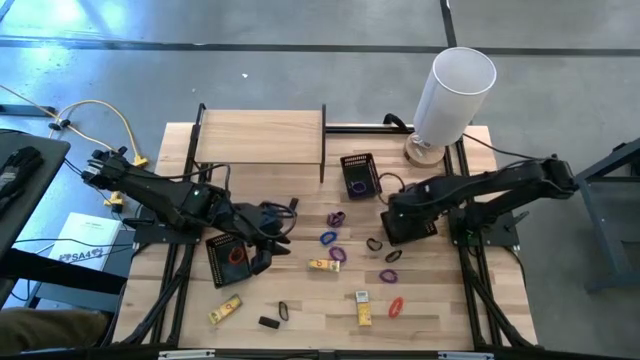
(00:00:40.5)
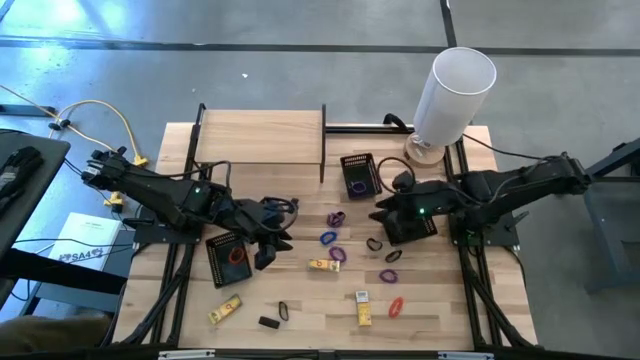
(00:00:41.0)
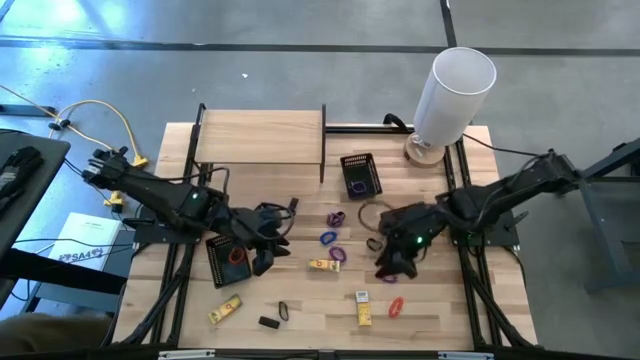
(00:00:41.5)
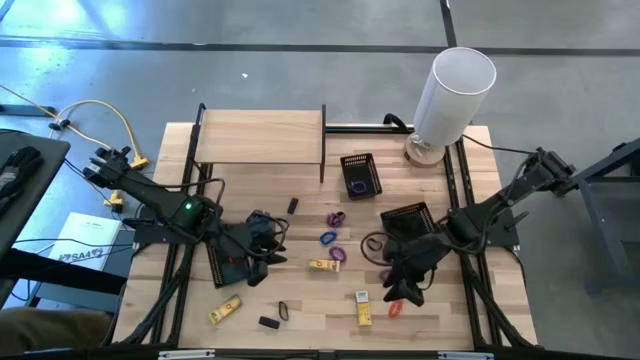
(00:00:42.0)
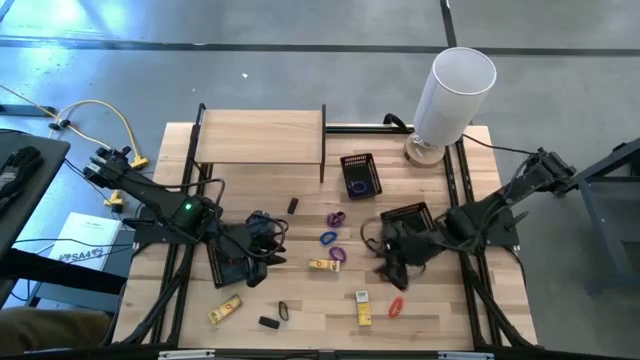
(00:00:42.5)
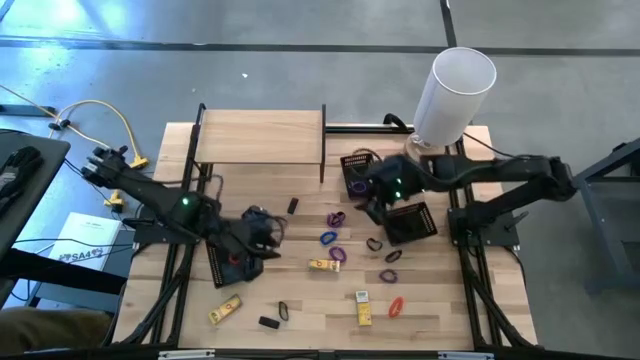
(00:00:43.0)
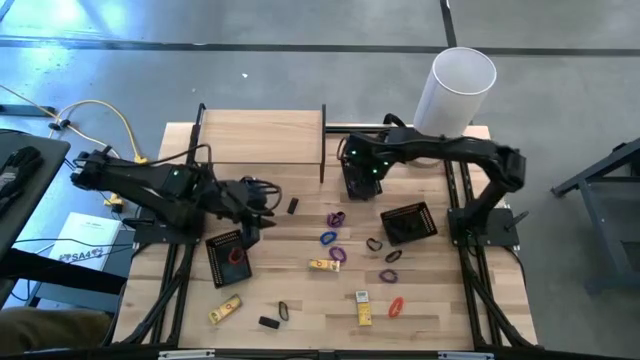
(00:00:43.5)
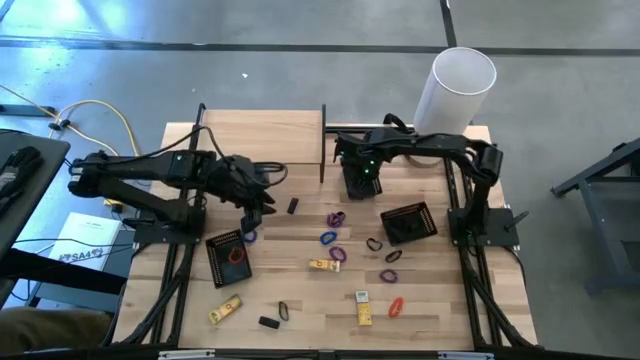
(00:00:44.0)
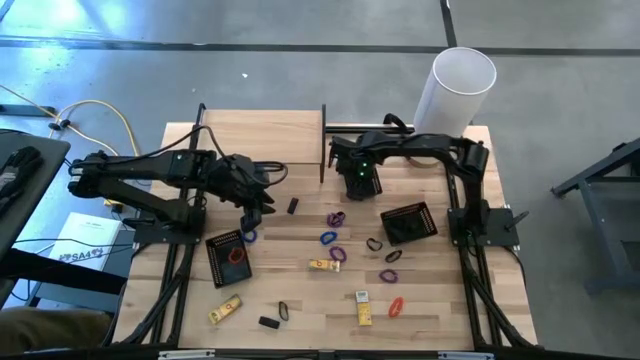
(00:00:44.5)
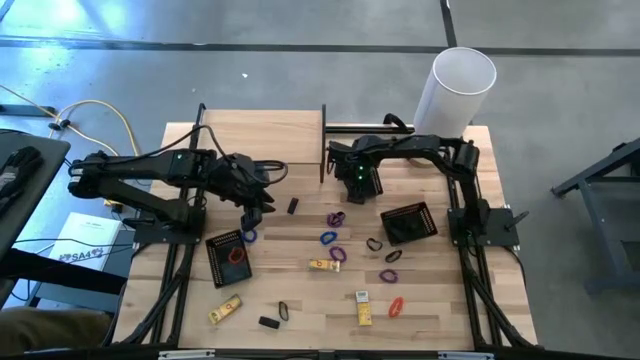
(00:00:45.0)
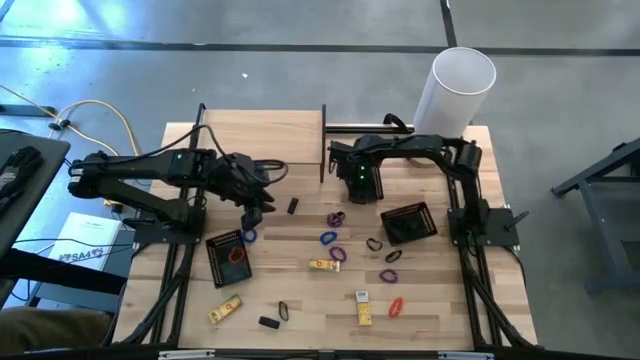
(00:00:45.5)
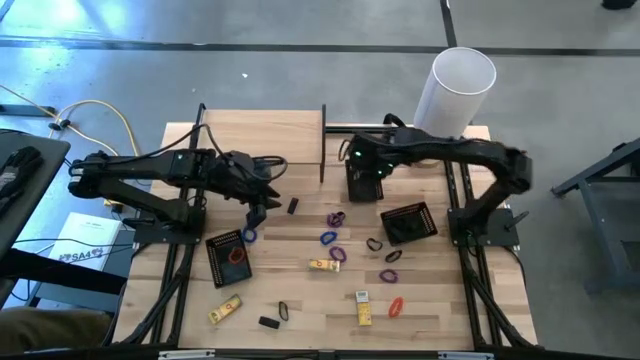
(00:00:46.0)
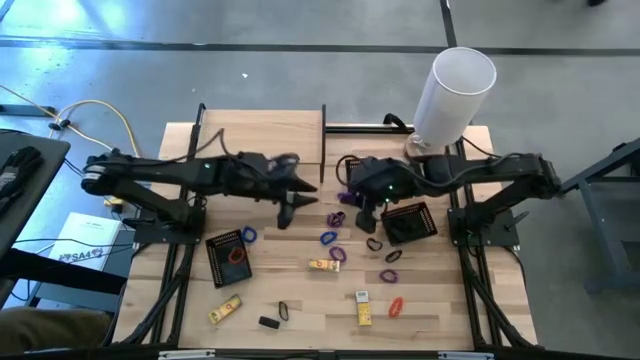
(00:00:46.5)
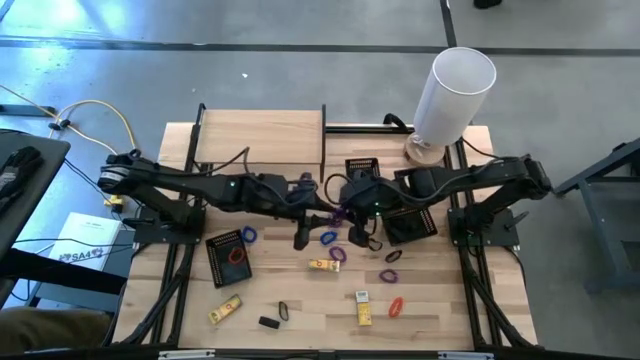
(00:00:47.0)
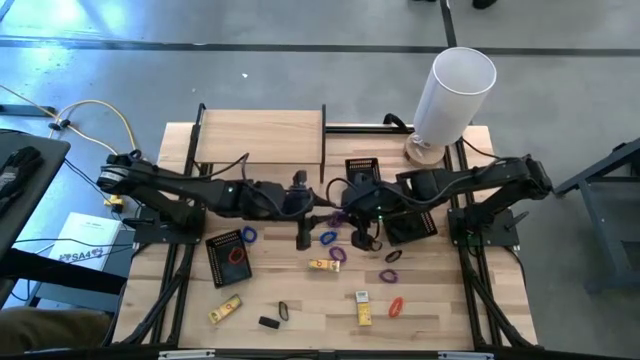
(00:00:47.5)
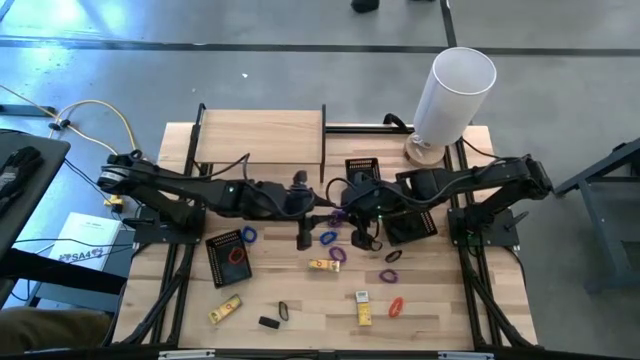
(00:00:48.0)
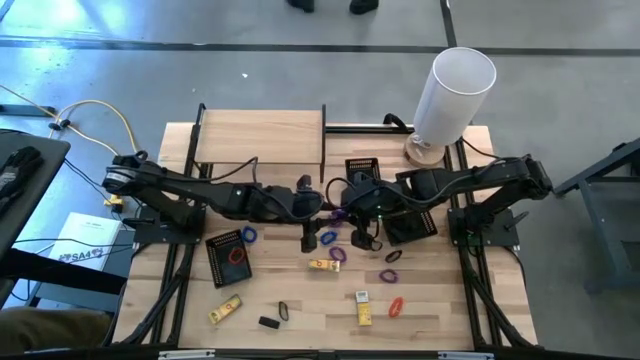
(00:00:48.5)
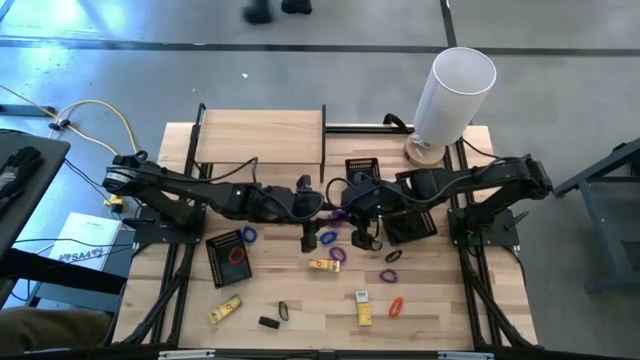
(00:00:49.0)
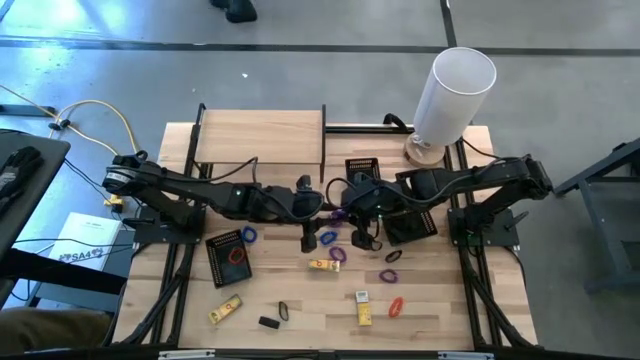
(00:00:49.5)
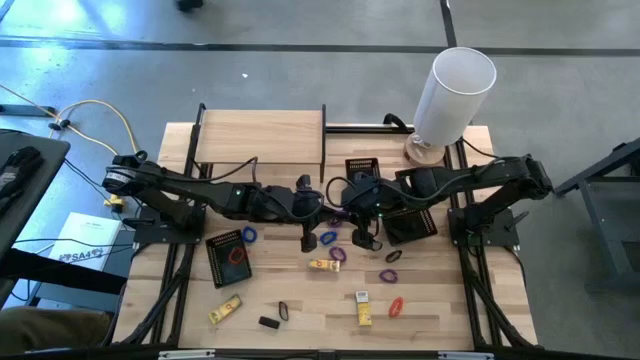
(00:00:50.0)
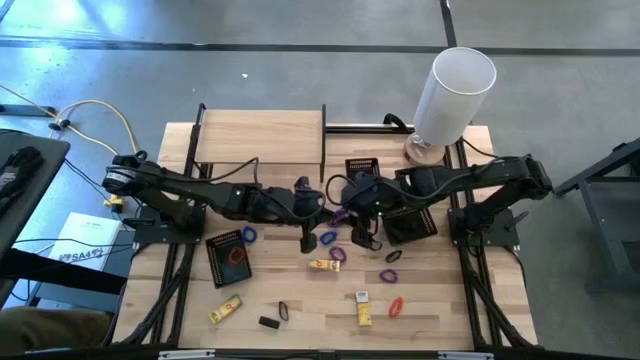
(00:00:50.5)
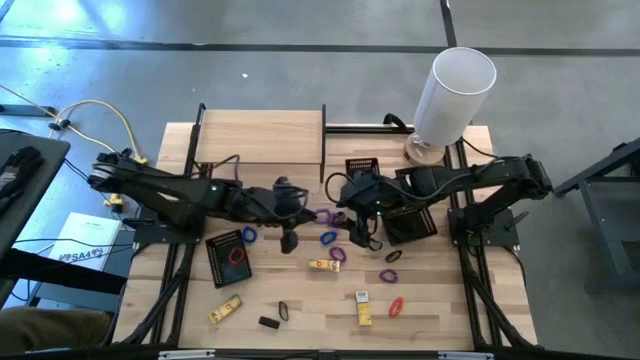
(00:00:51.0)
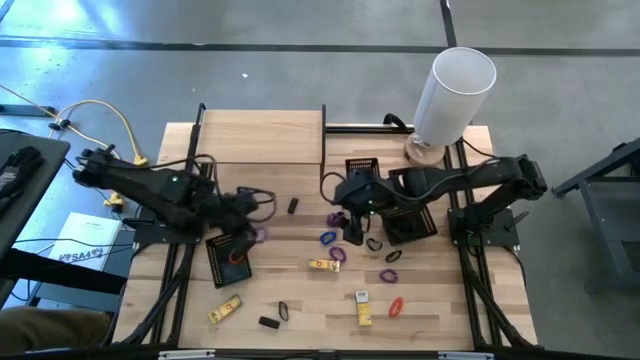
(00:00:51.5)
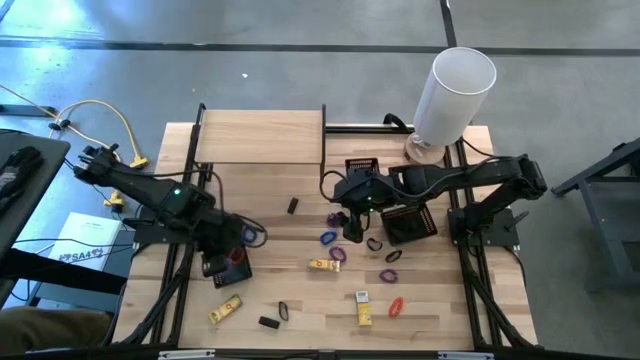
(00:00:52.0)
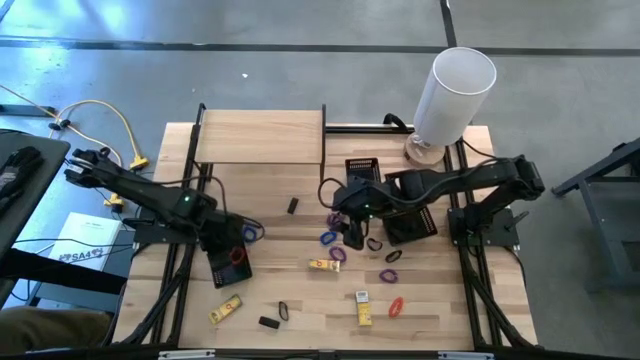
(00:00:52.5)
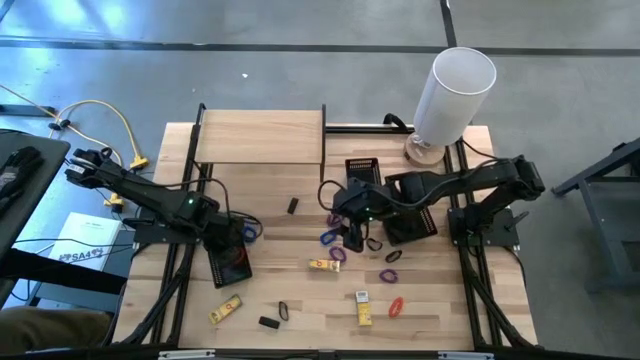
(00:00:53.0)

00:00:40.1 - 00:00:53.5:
Task: Pick & Place Office Desk Supplies
Put the purple spring keychain into the bottom left black bin

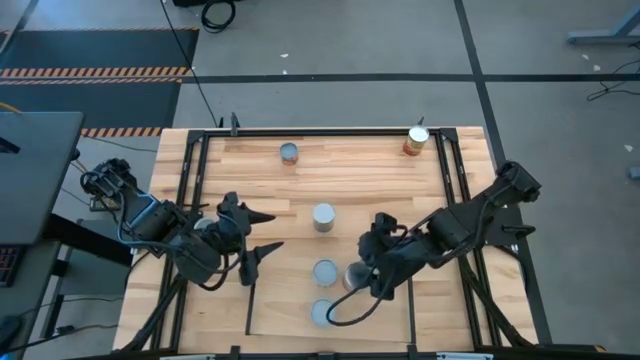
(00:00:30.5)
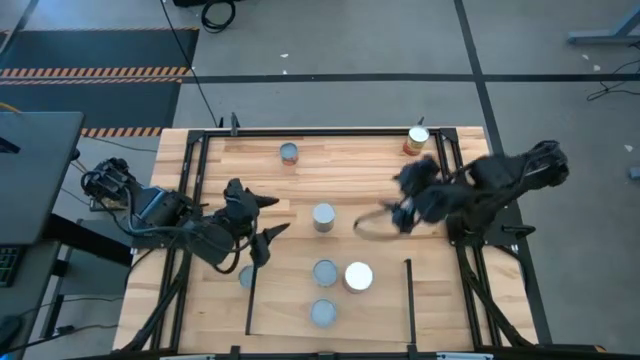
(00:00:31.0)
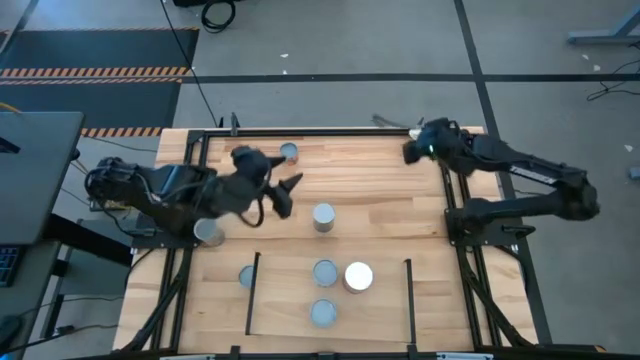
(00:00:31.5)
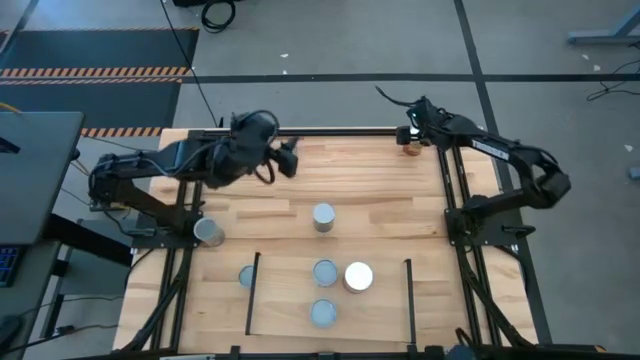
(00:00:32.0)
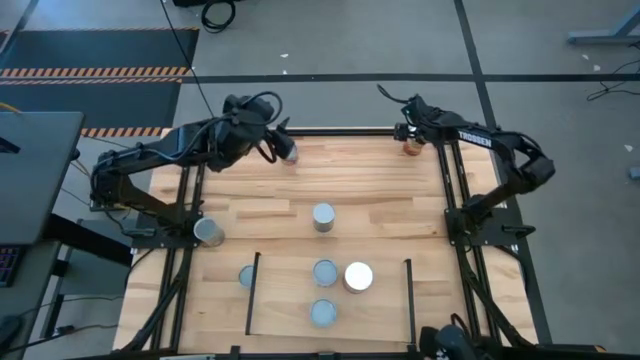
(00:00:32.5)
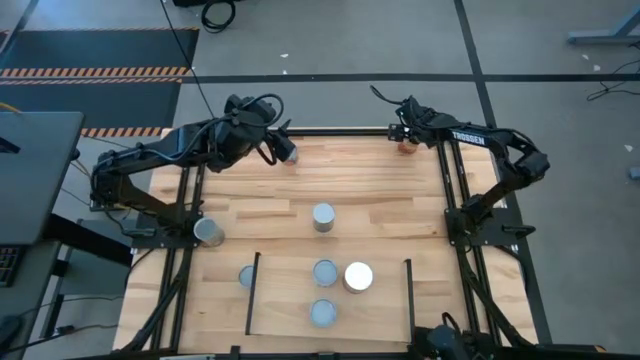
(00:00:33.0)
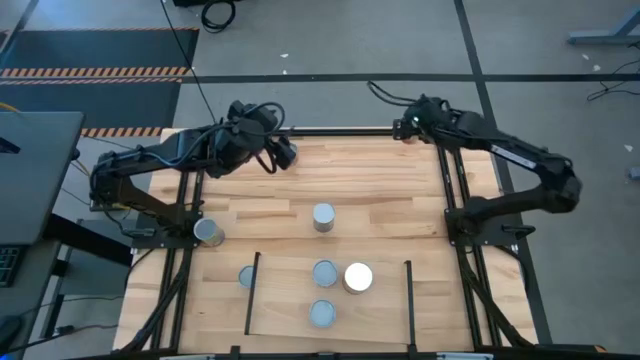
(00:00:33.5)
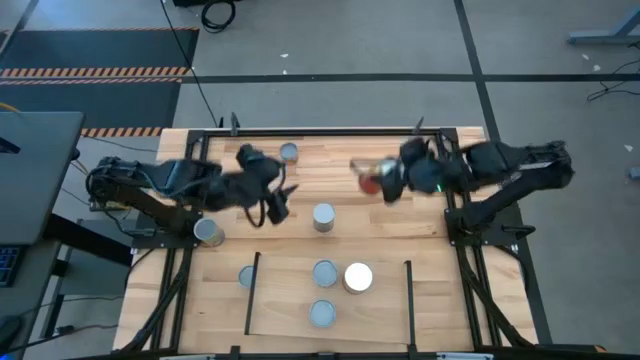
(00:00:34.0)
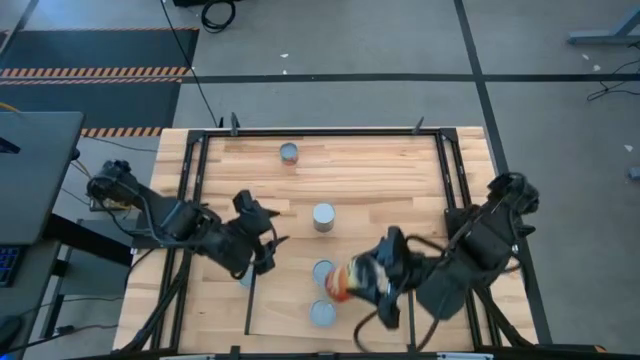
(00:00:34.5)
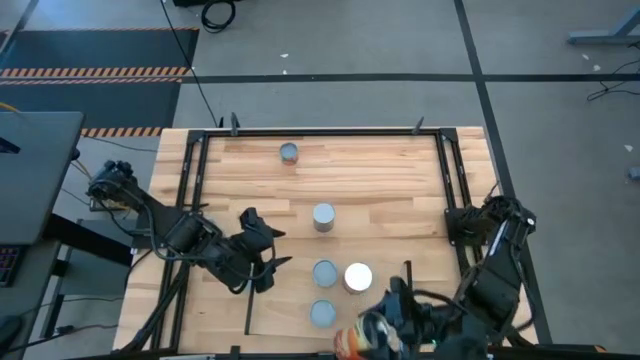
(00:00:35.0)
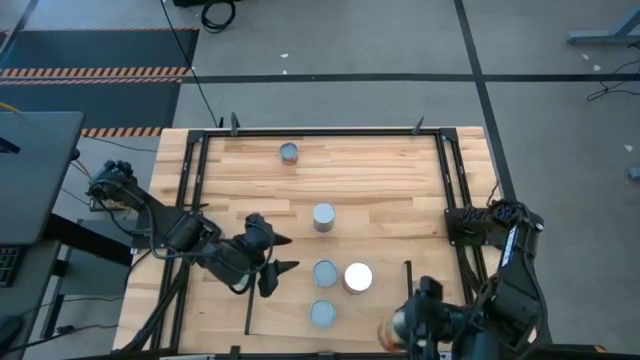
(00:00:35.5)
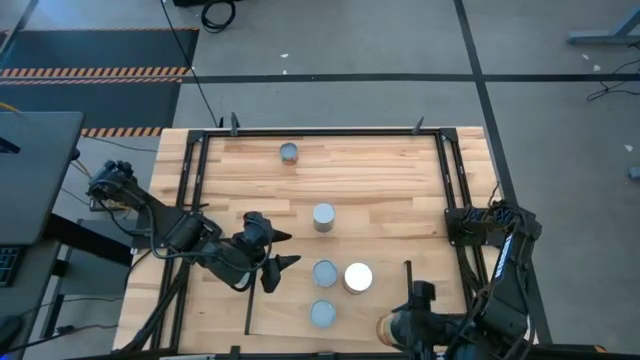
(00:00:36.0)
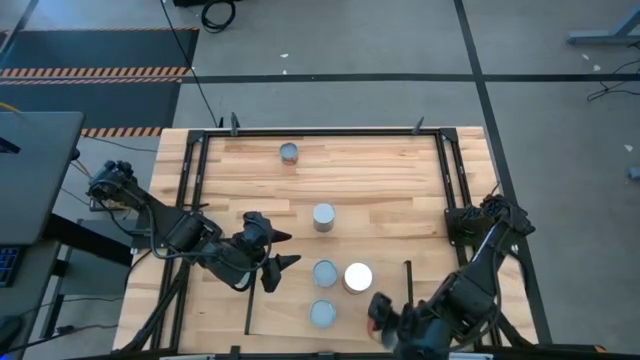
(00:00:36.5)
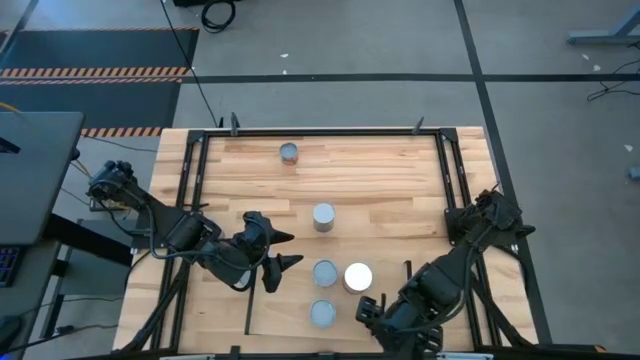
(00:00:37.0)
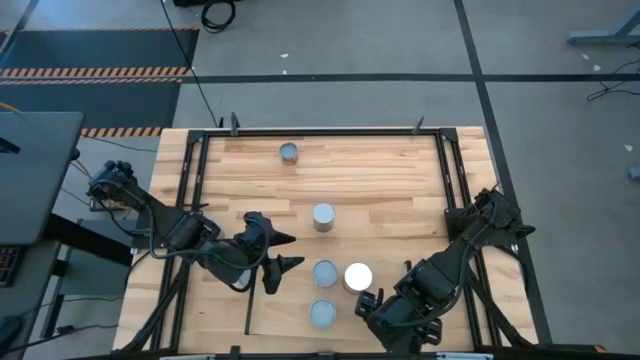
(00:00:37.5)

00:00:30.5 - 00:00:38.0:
Task: Pick and place cans onto a shelf
Put the canned corn on the shelf
